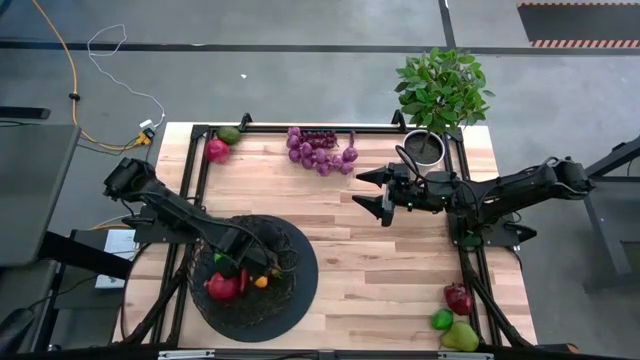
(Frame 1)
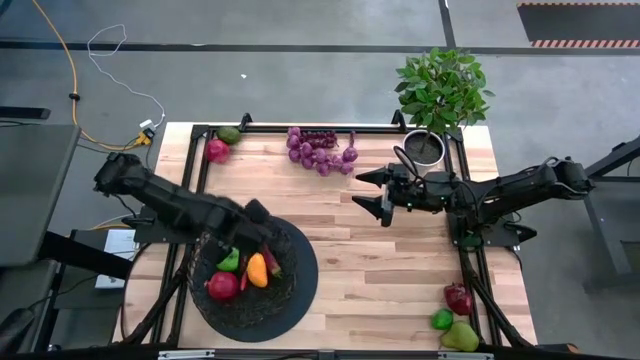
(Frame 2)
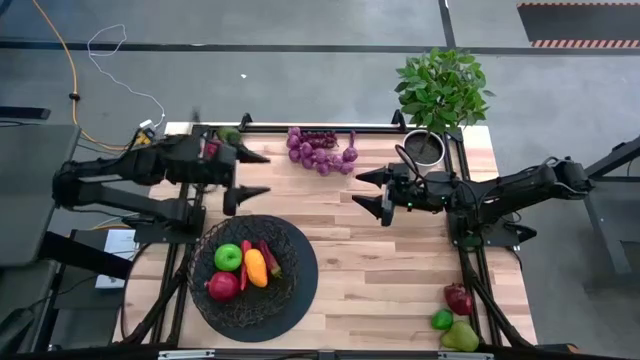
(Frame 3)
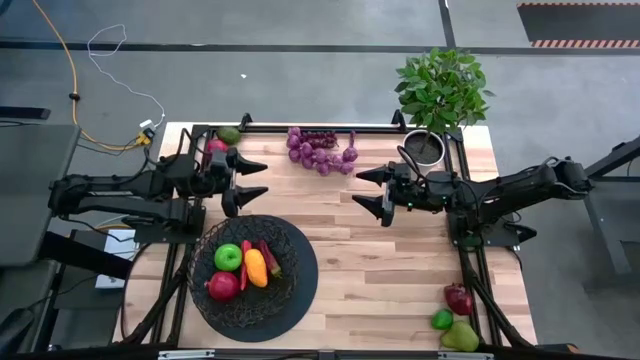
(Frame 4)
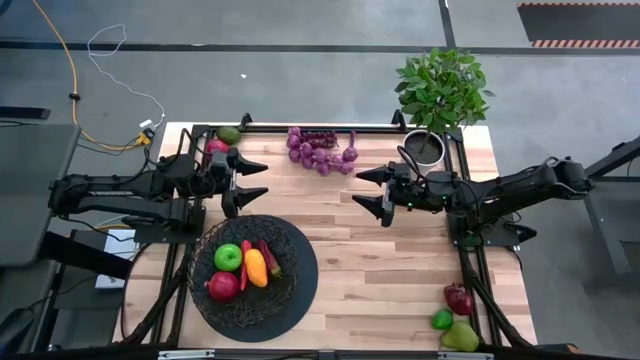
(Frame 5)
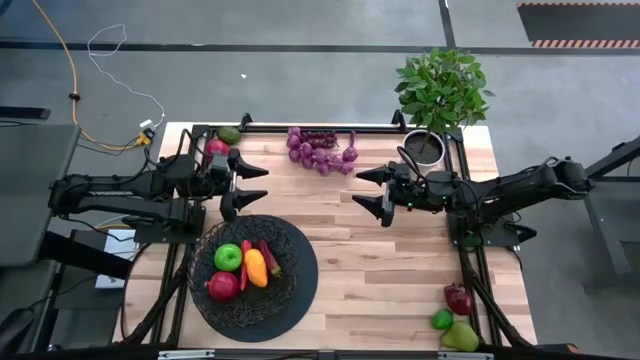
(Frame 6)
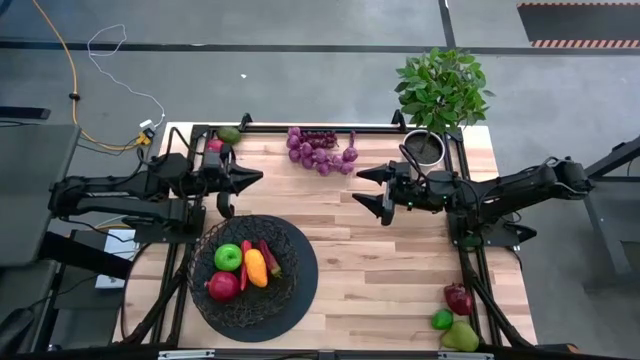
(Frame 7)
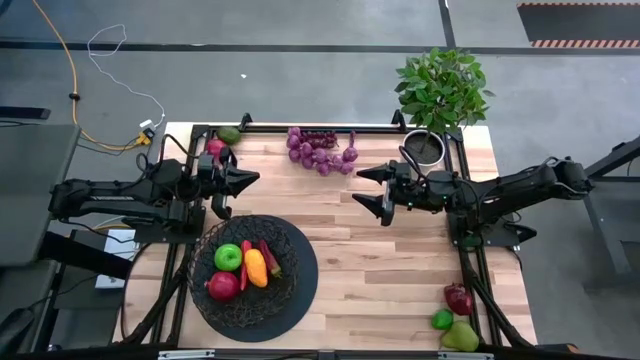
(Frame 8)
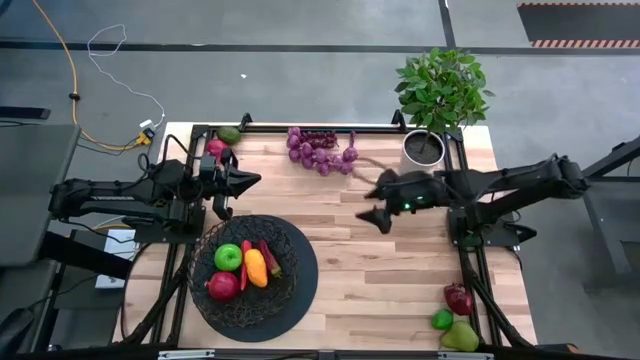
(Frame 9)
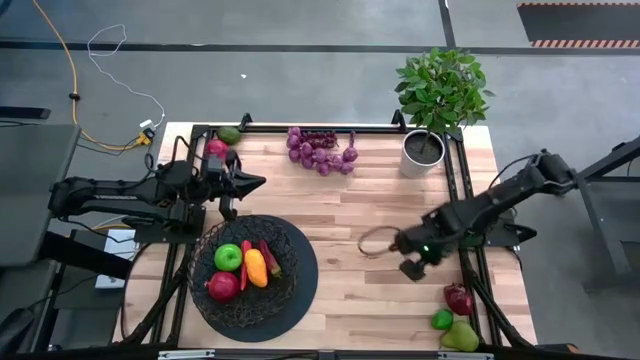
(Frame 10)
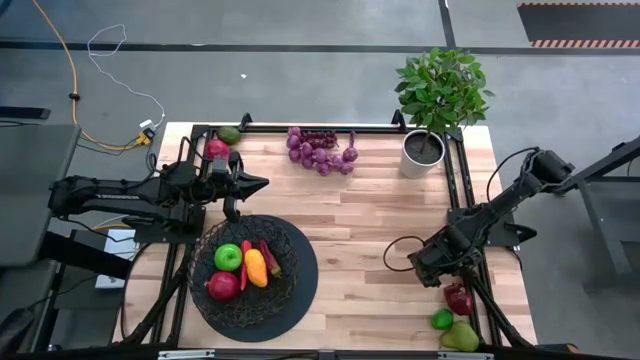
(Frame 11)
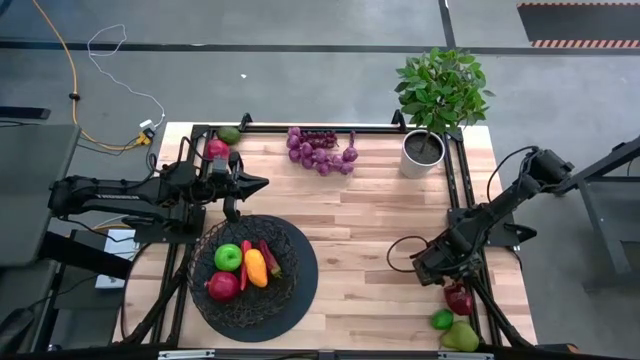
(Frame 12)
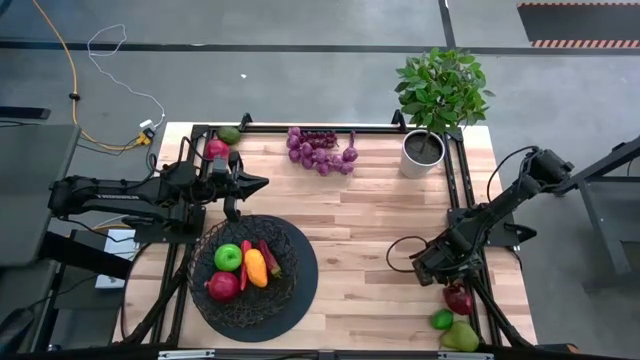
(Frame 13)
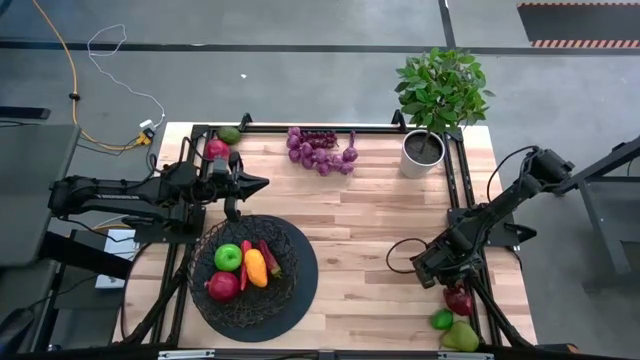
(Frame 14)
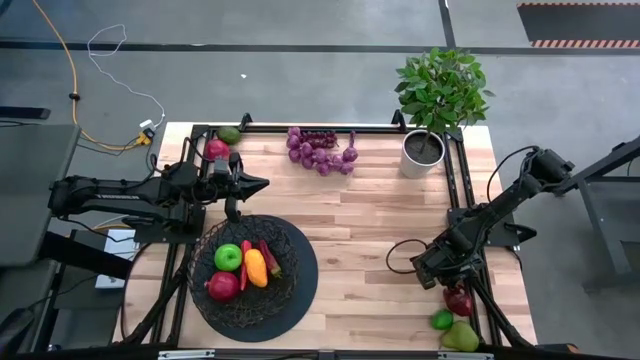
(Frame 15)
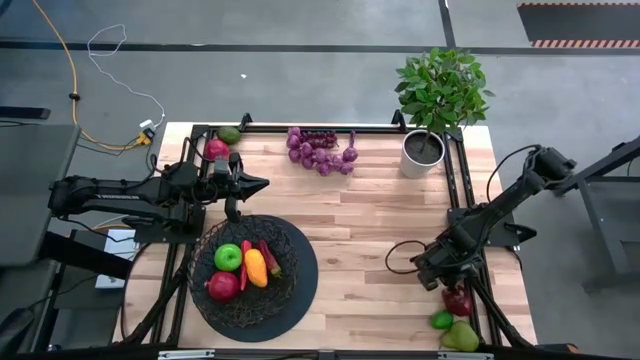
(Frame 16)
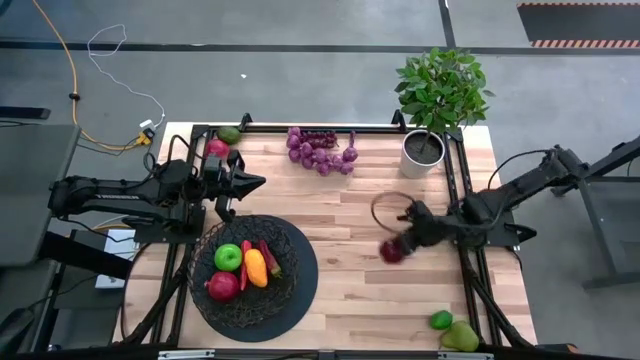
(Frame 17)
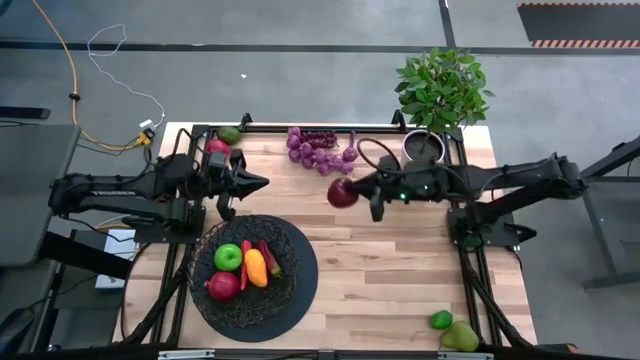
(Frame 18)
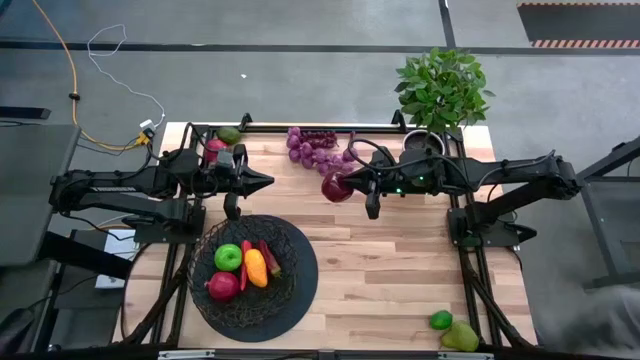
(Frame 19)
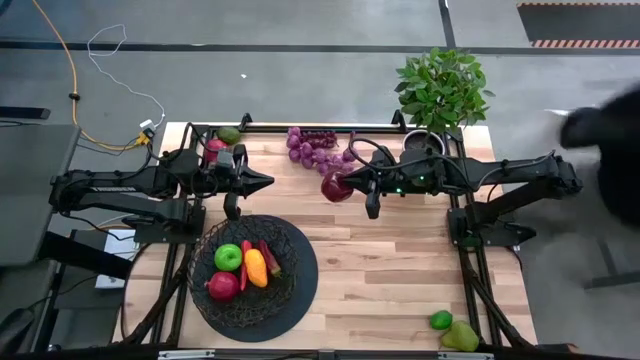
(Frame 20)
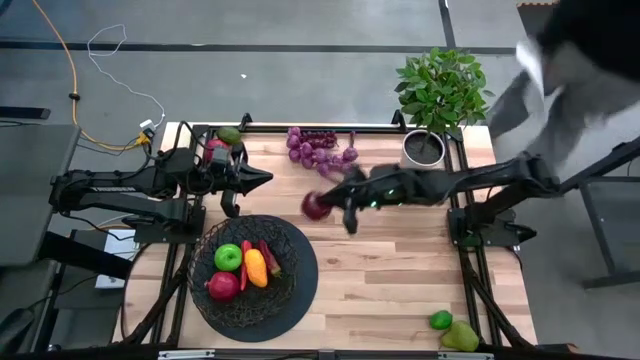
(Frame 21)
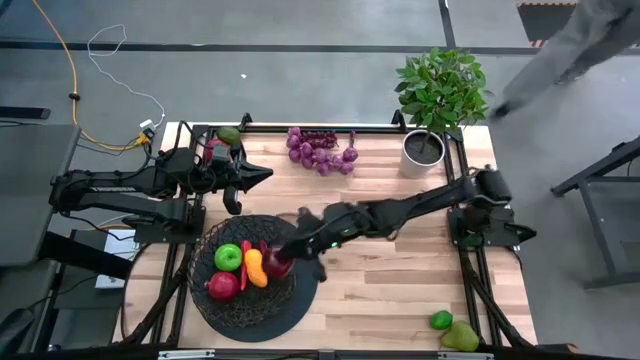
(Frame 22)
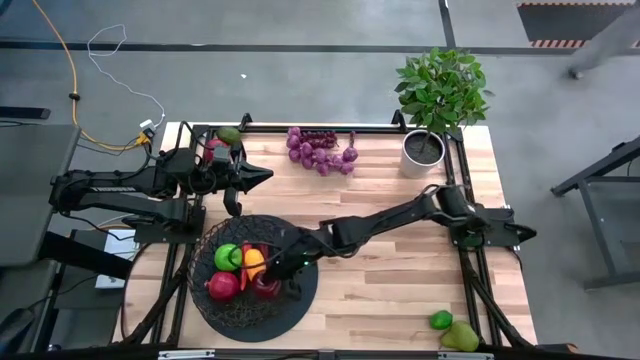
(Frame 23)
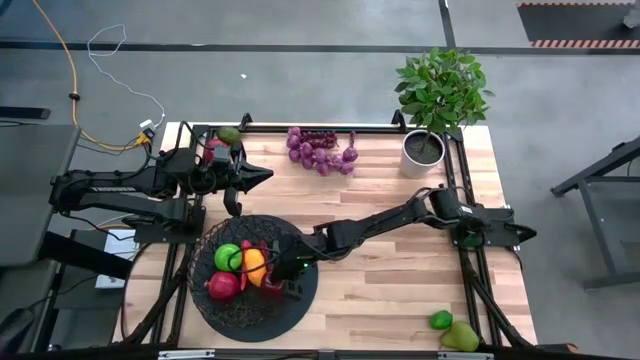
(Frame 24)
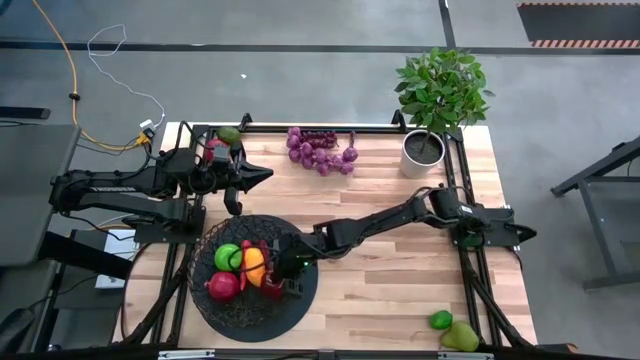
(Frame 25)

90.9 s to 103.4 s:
Task: Build produce basket
Put the dark red apple into the black basket

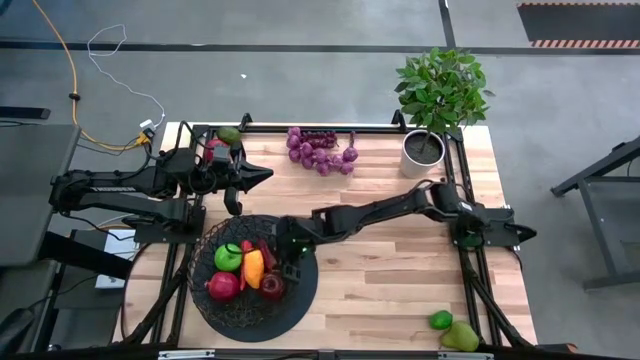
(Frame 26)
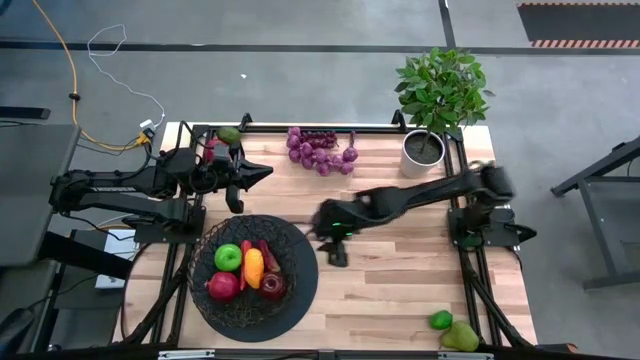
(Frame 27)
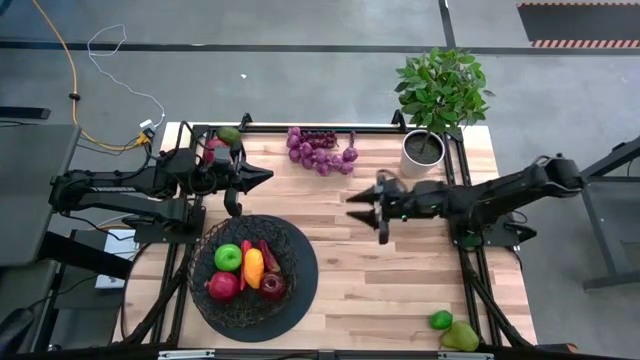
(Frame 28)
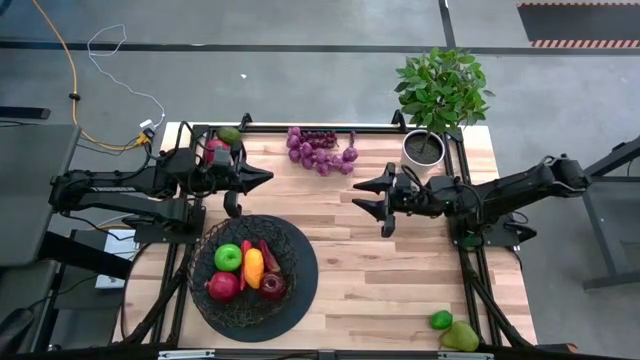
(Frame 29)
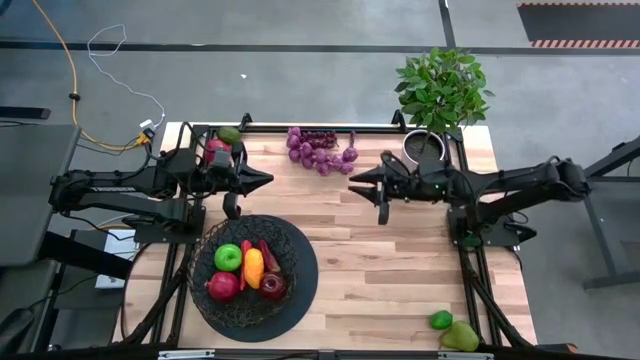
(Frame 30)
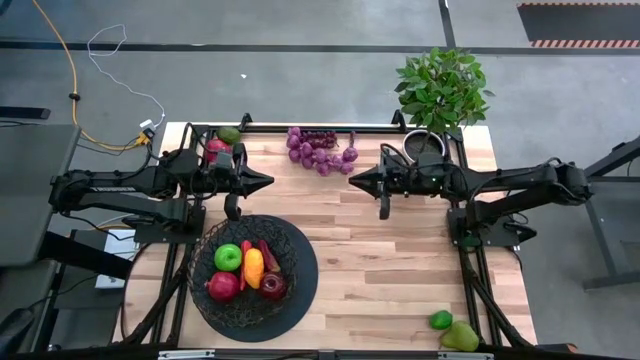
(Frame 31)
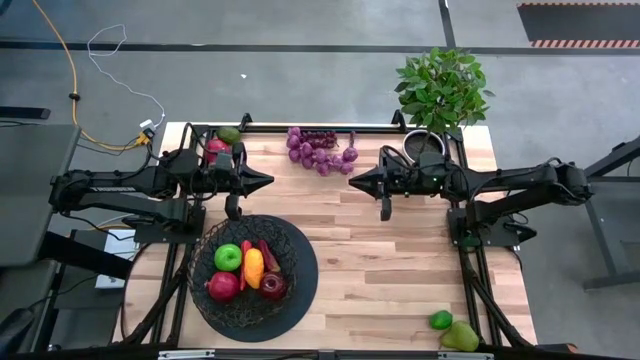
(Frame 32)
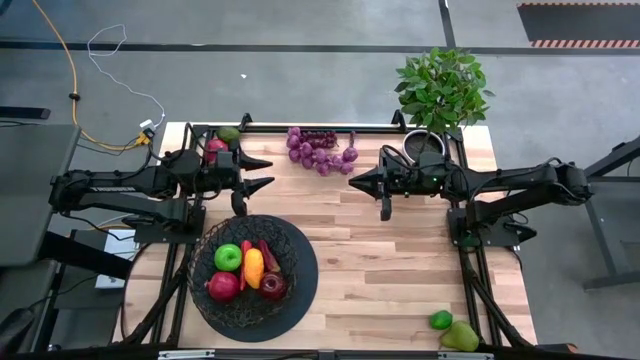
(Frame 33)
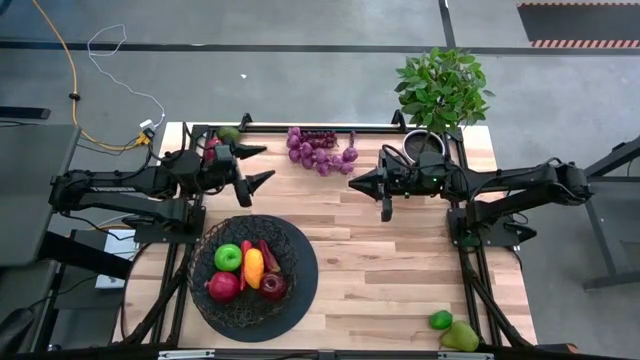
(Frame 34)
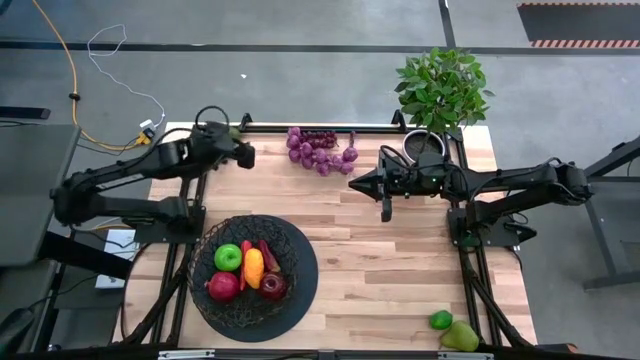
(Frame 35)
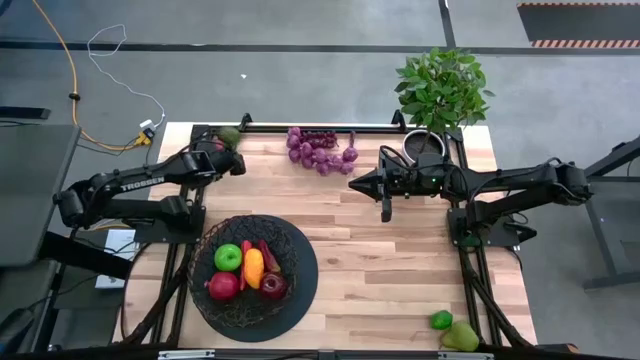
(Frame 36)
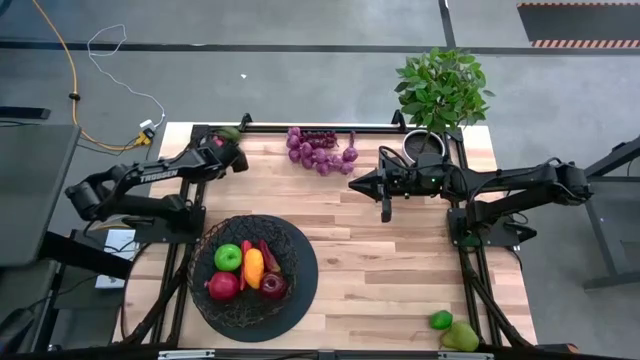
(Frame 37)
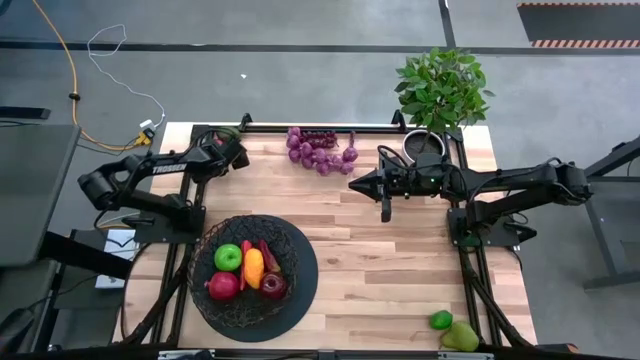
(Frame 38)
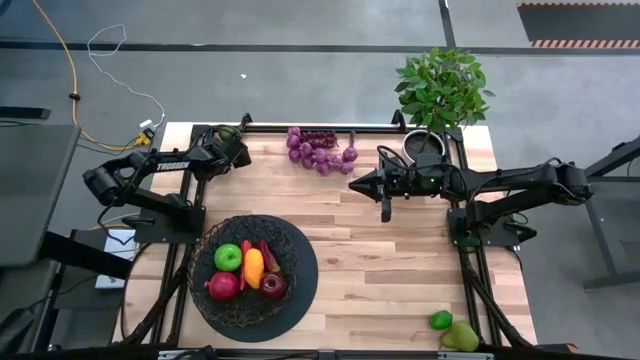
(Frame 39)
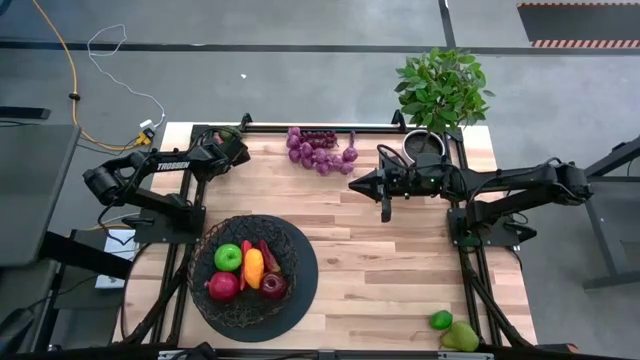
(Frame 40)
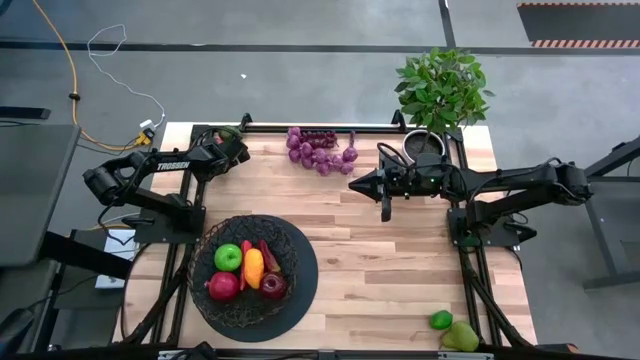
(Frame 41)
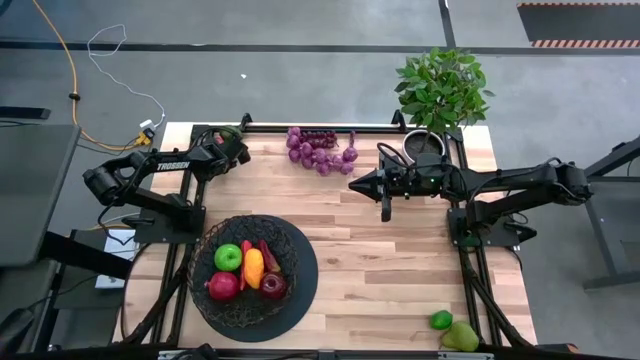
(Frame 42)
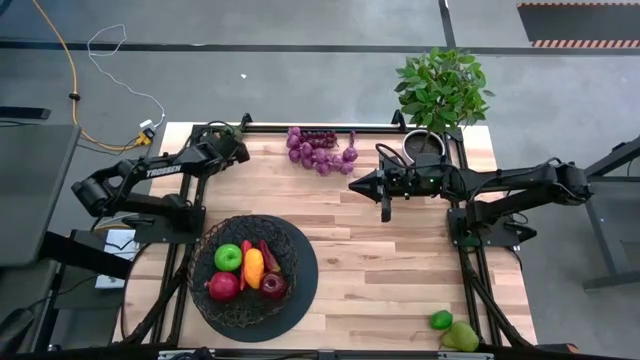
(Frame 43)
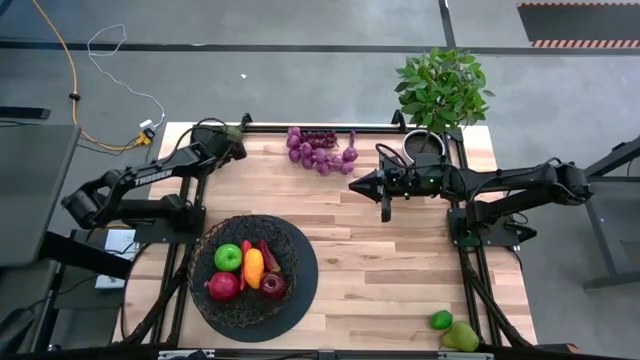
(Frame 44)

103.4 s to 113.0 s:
Put the pomegranate into the black basket
